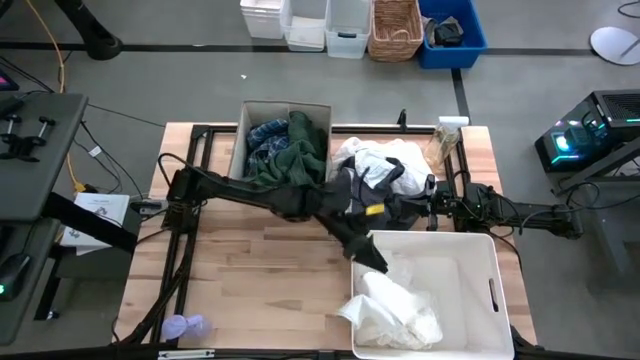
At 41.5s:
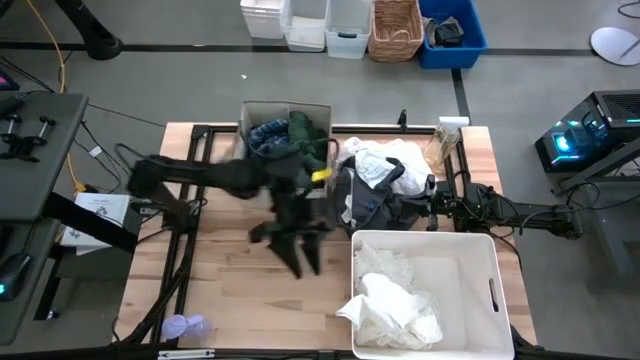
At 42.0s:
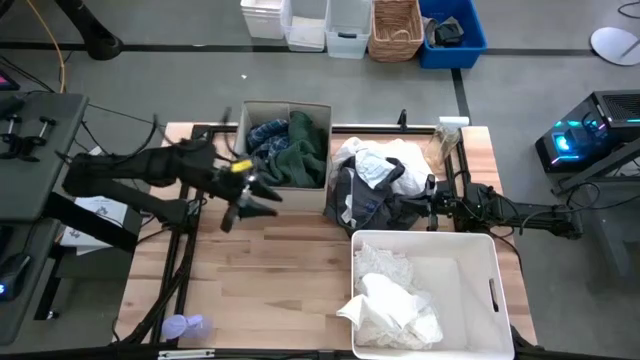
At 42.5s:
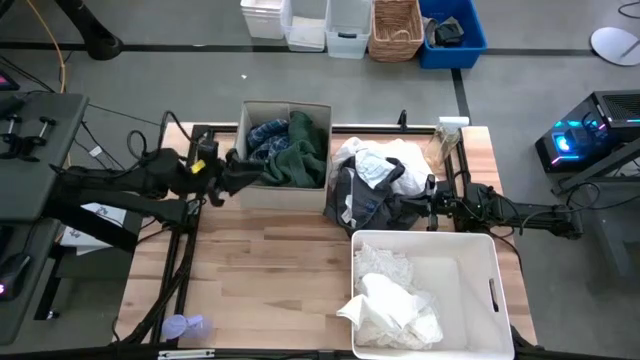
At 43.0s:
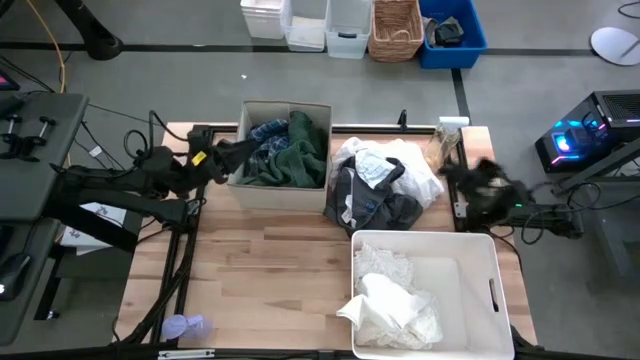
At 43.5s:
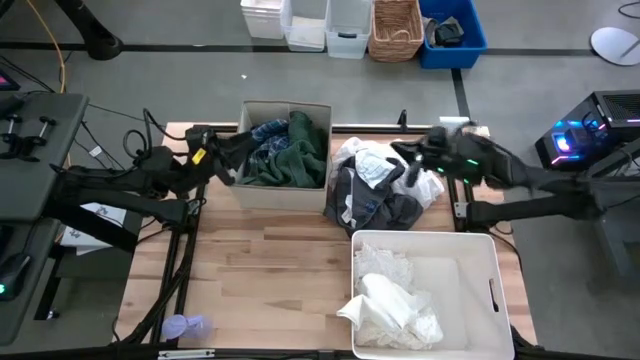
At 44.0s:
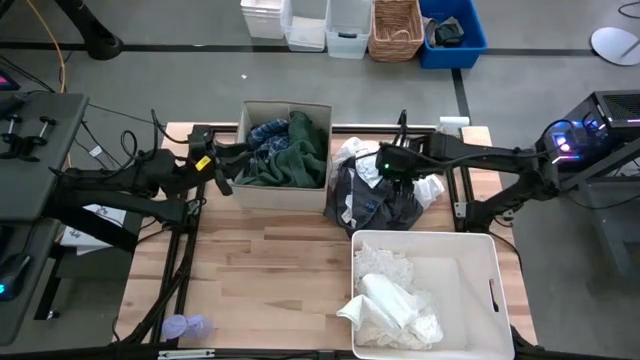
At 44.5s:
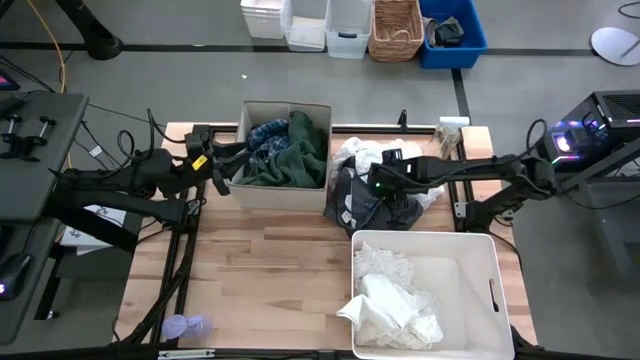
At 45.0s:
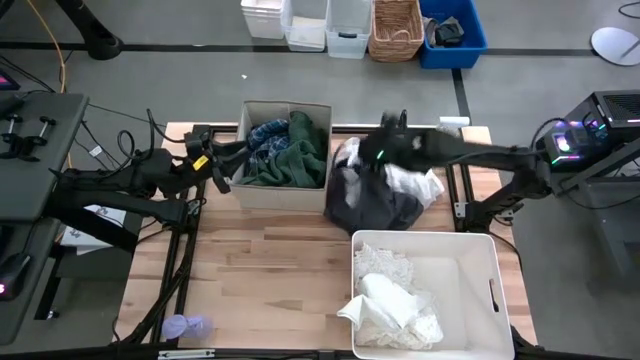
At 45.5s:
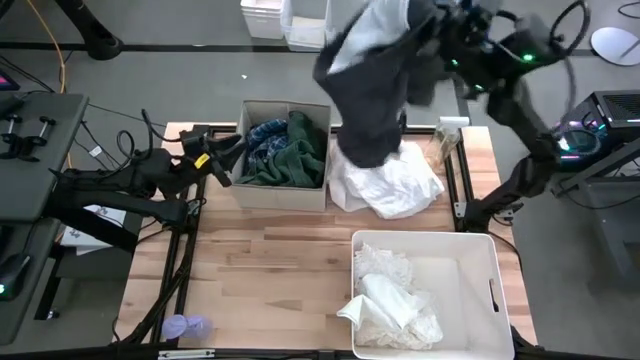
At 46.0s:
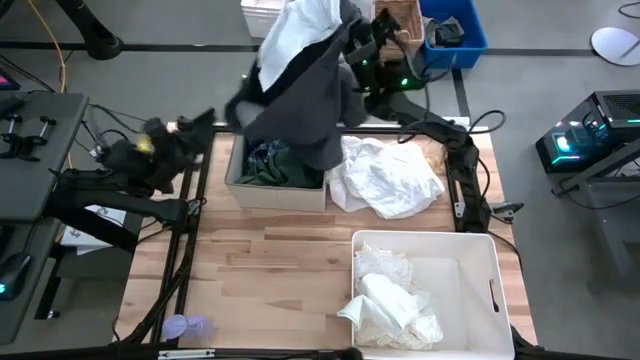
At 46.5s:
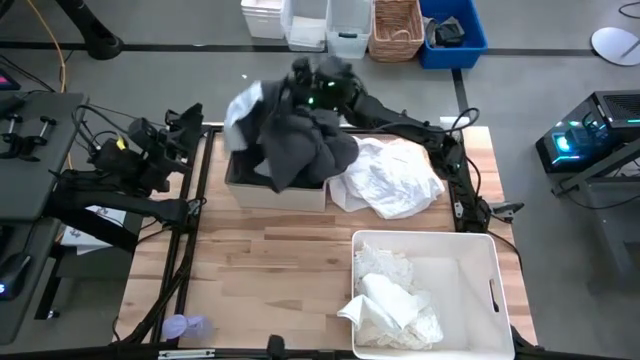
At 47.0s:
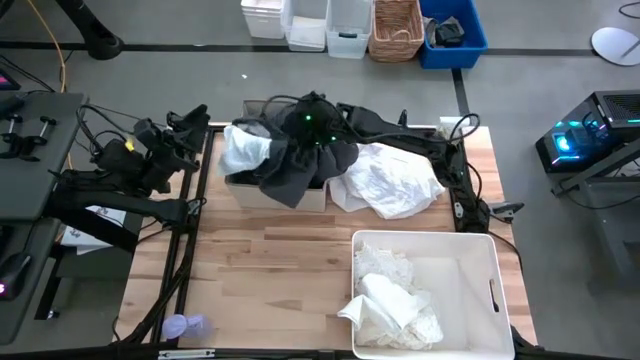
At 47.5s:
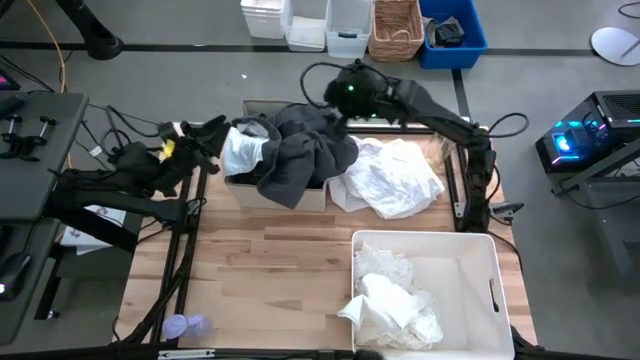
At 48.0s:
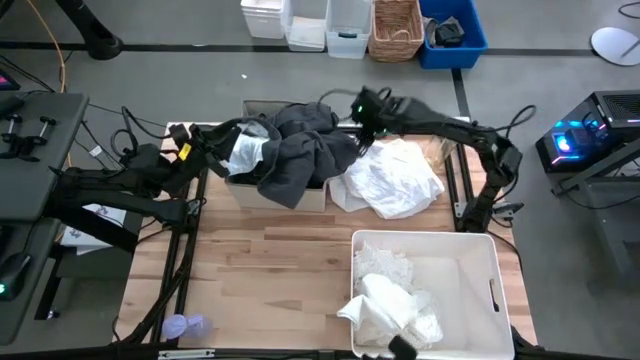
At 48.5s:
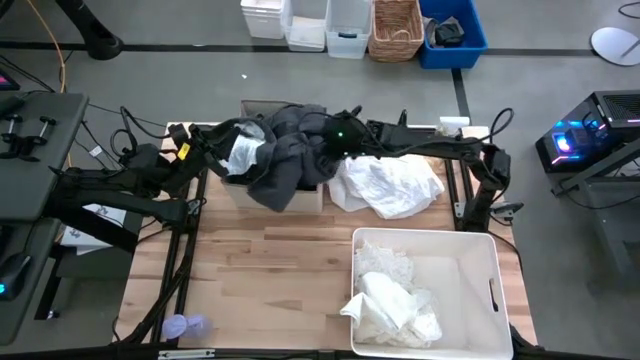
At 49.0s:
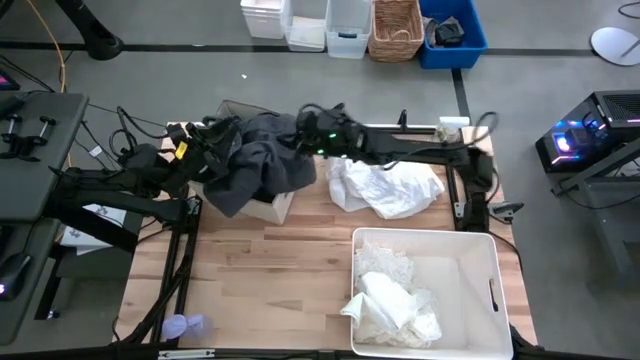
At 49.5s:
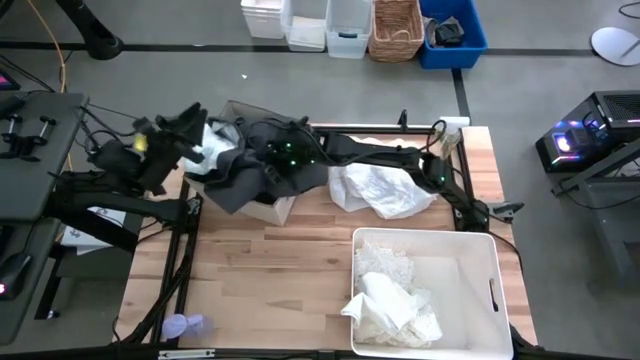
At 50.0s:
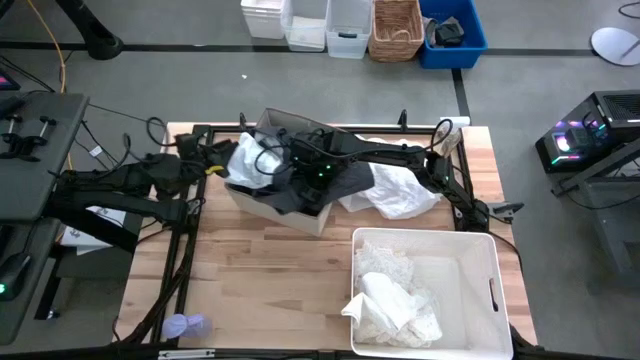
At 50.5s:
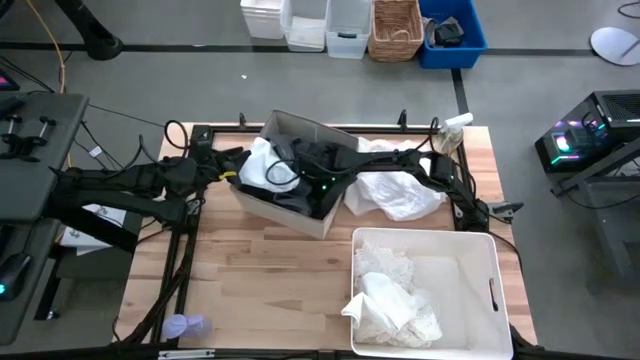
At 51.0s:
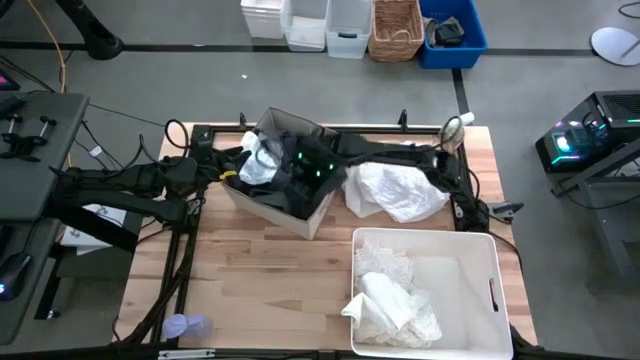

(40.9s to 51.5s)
Task: Sort clothes
Put the black shorts into the laundry organizer

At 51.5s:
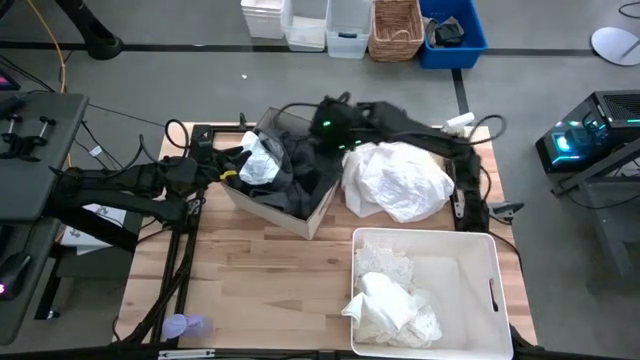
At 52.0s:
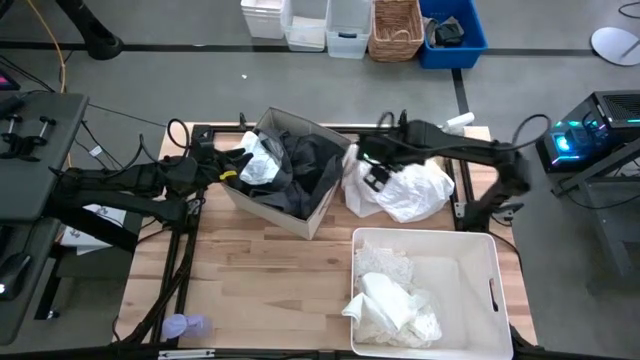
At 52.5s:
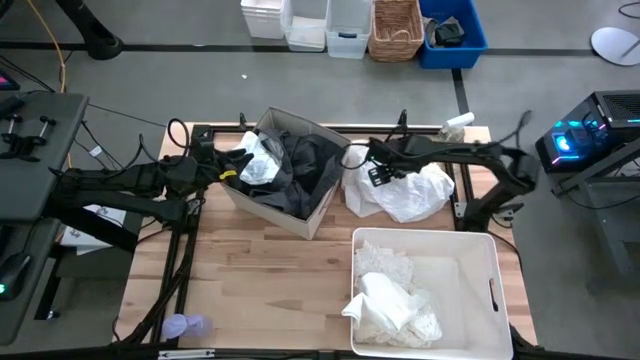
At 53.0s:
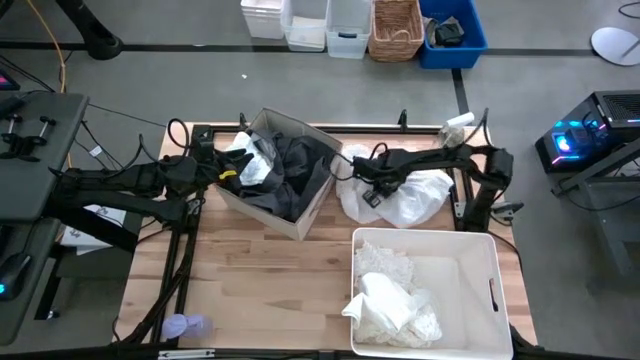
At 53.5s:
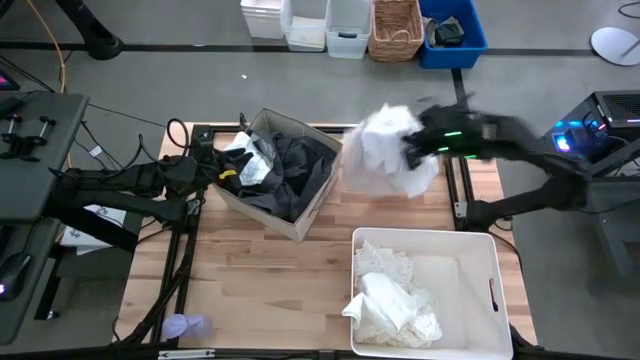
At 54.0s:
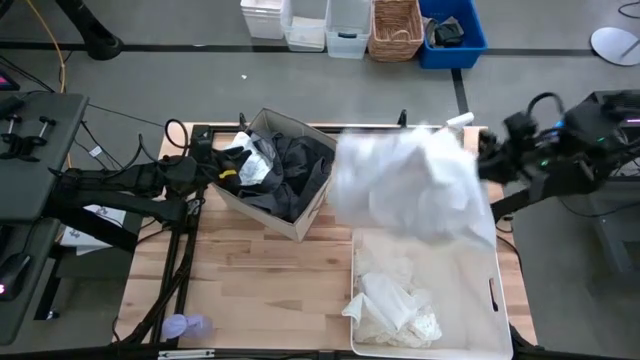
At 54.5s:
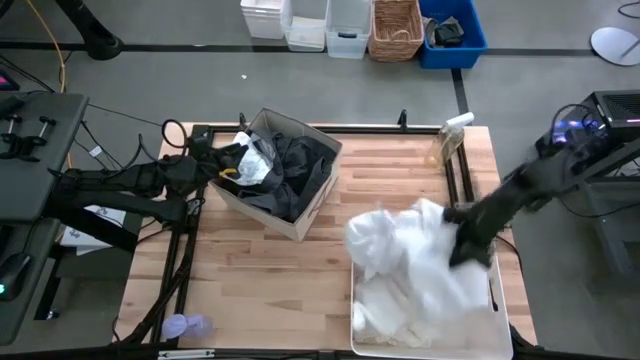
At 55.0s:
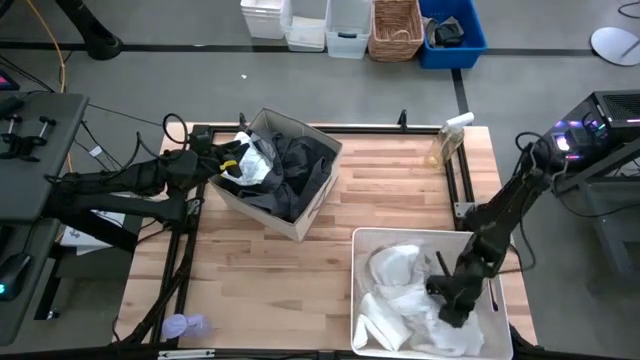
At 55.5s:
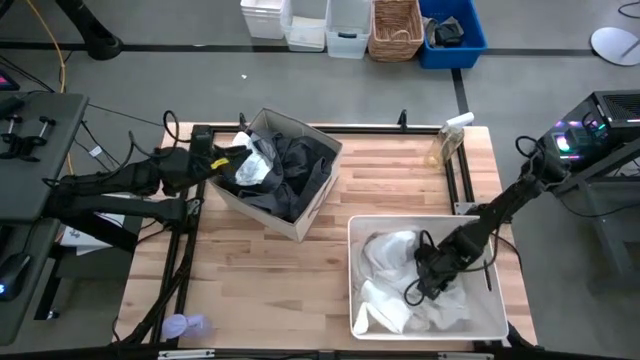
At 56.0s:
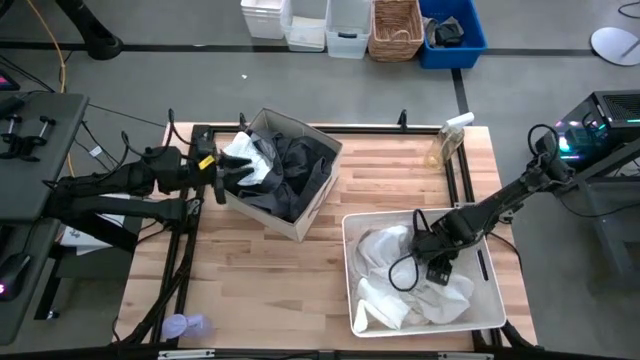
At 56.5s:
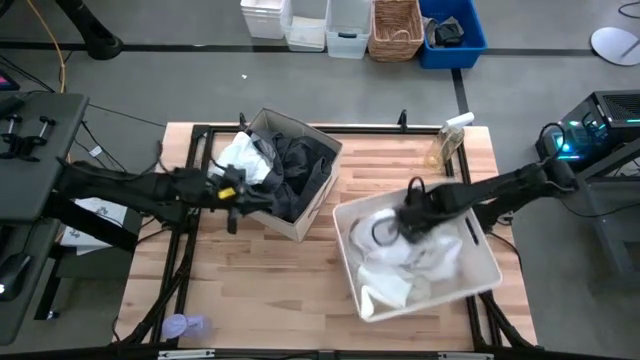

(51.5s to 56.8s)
Put the white polo shirt into the laundry bin

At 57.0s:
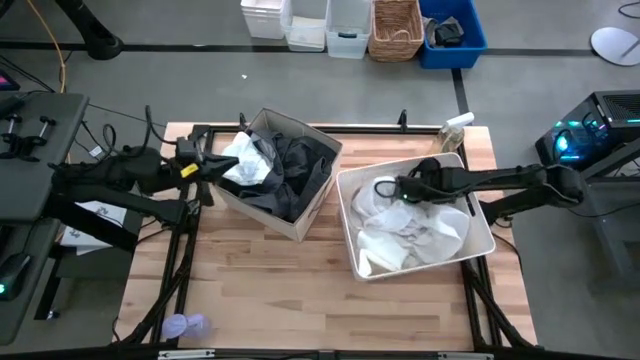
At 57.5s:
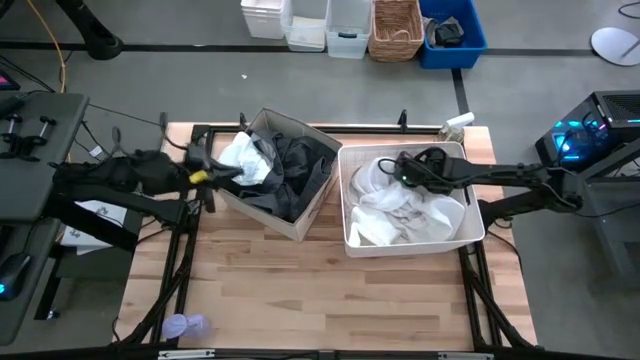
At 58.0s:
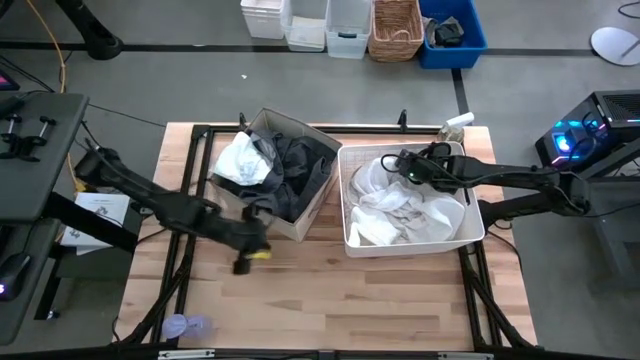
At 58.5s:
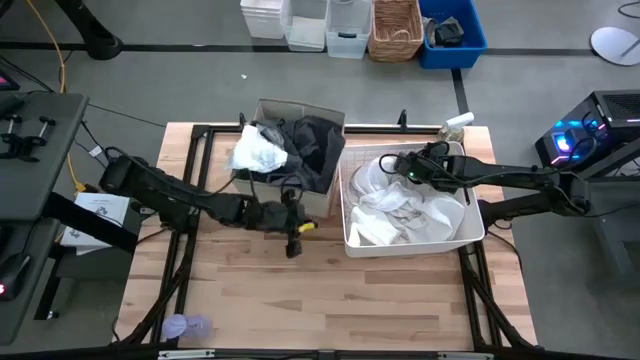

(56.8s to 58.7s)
Adjust the laundry organizer and bin

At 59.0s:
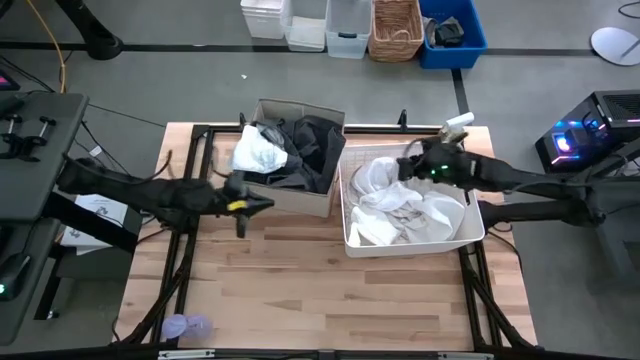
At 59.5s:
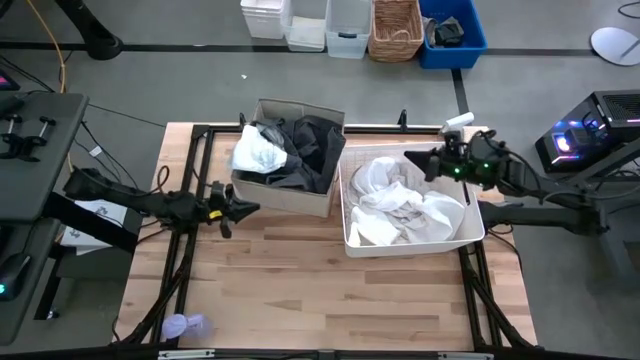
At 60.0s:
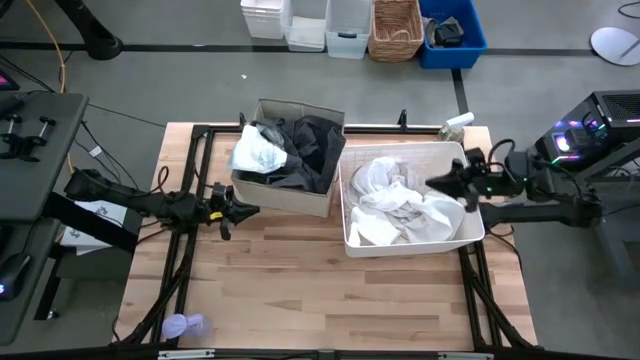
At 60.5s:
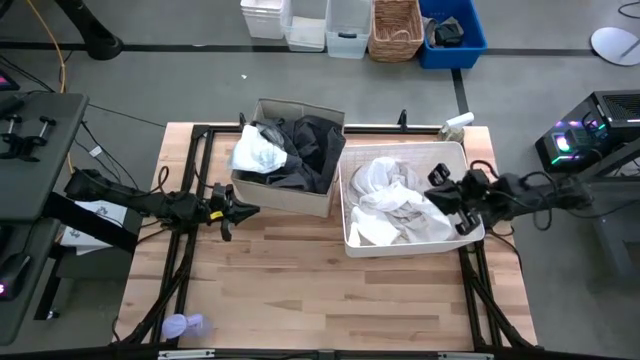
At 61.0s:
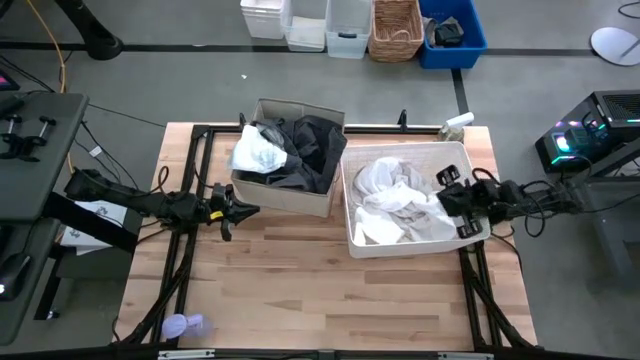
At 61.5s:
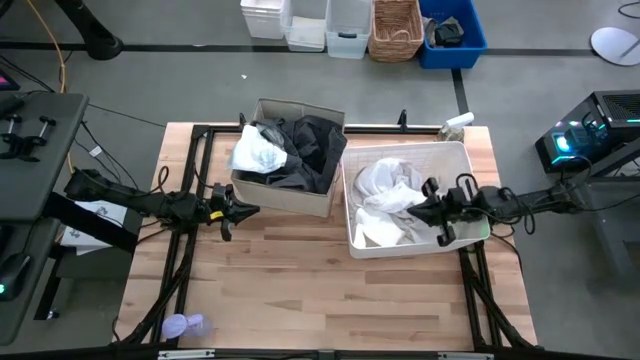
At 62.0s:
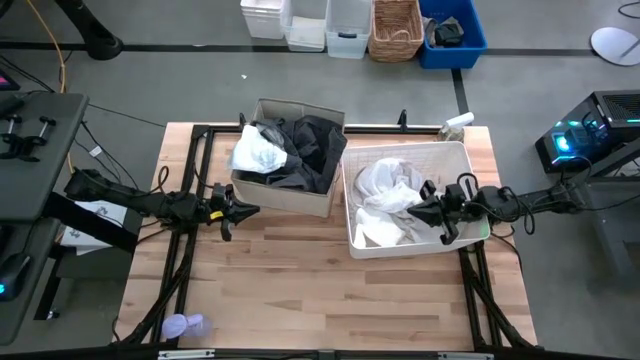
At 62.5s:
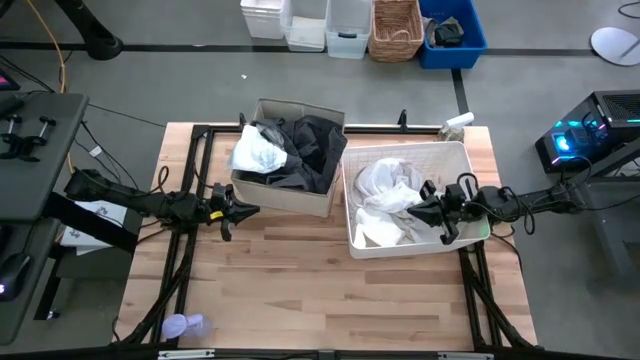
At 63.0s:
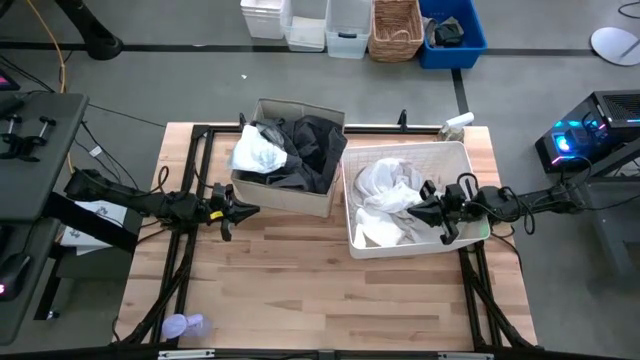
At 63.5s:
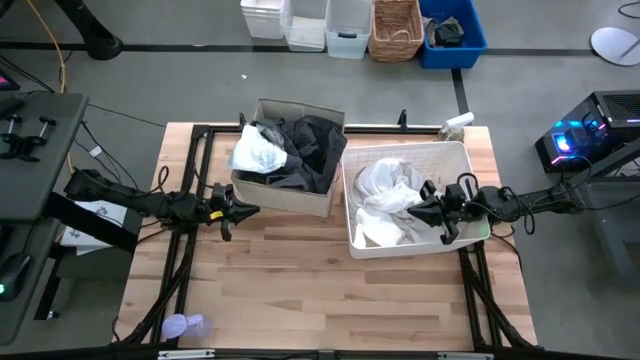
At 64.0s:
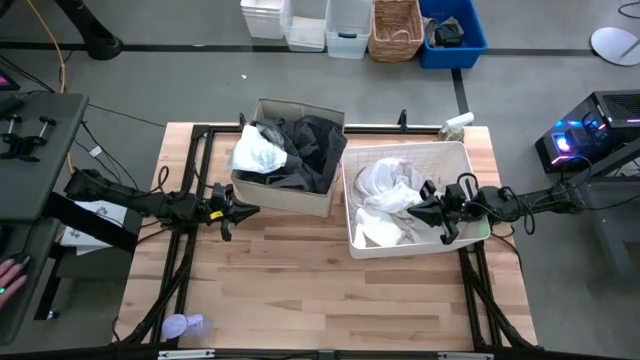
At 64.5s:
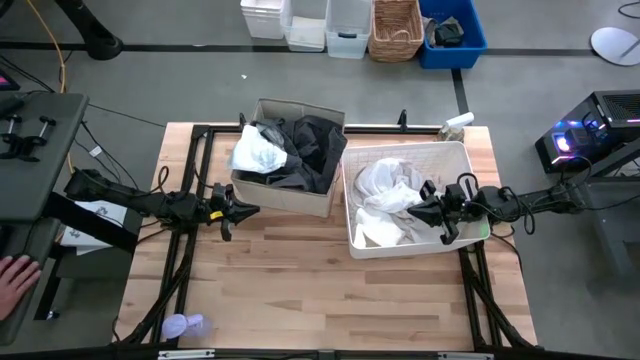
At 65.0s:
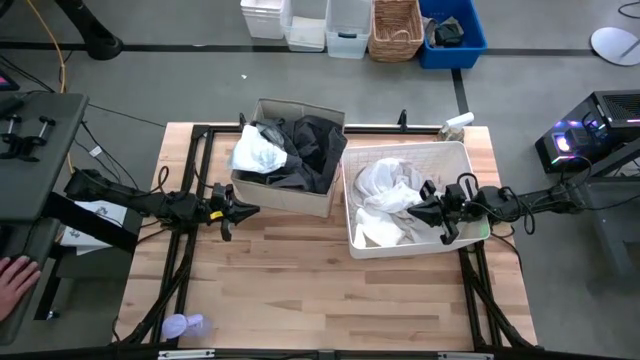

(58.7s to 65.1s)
Return to Home Position
